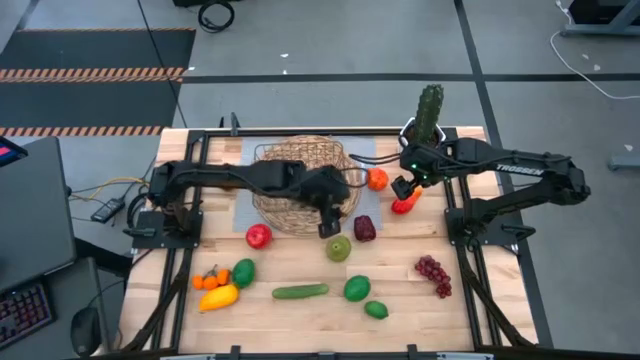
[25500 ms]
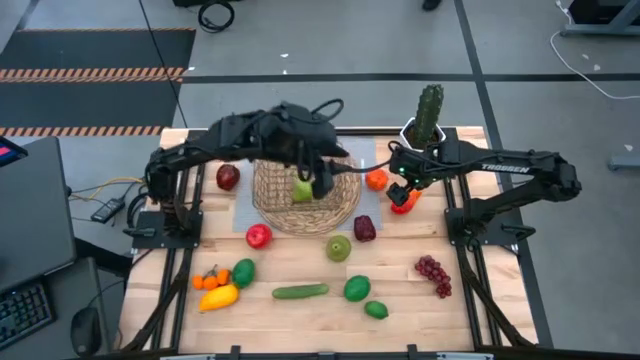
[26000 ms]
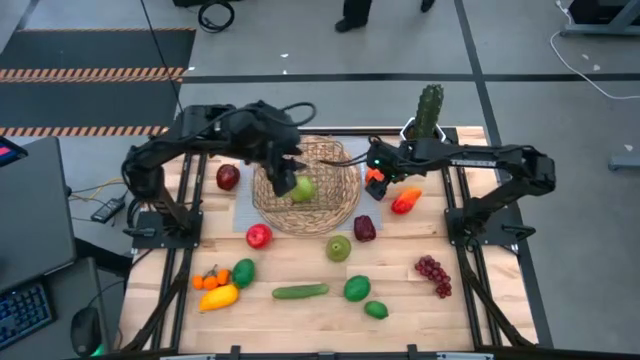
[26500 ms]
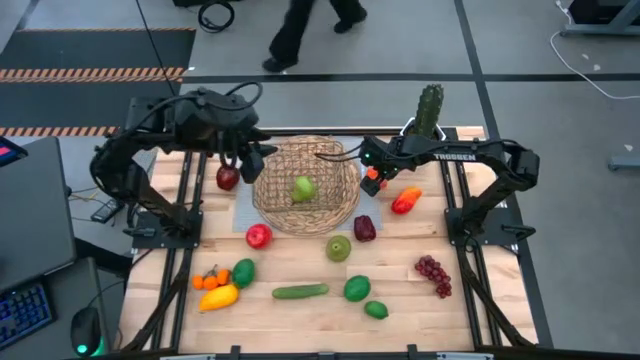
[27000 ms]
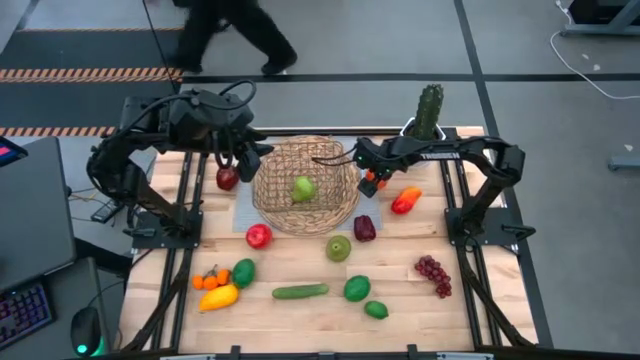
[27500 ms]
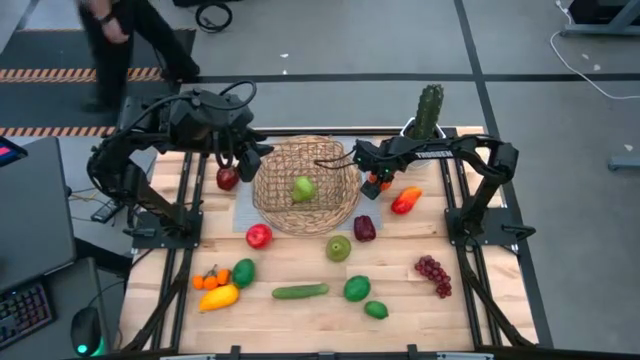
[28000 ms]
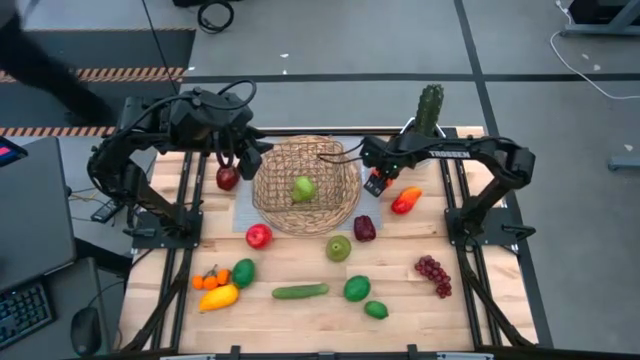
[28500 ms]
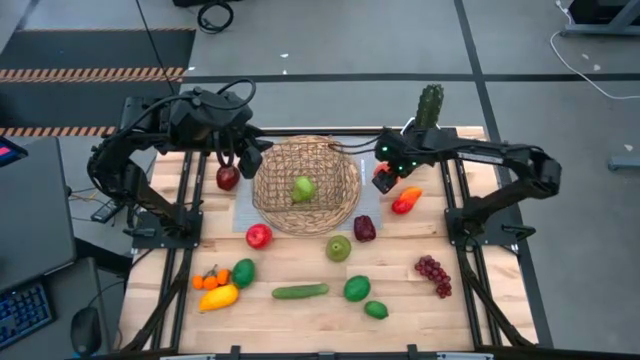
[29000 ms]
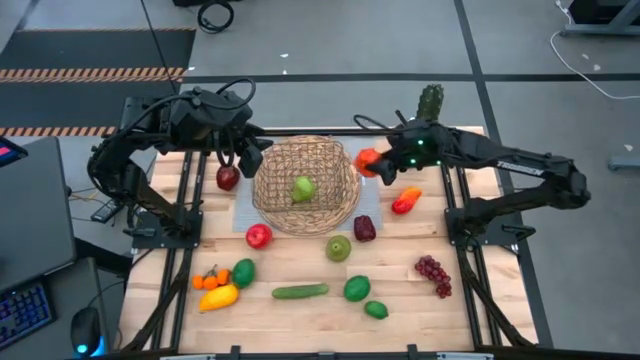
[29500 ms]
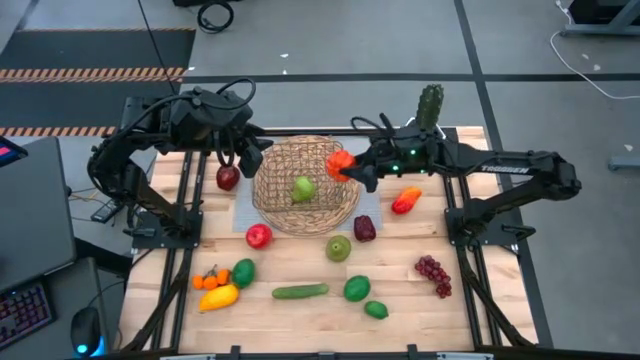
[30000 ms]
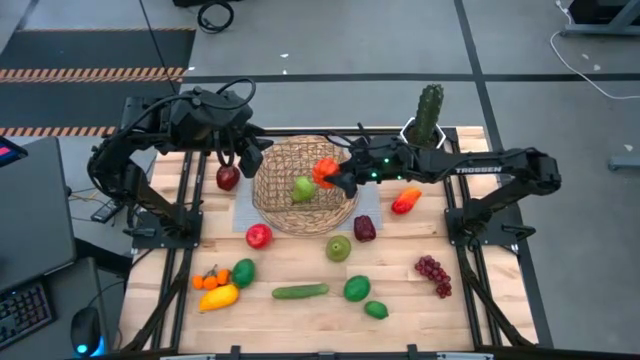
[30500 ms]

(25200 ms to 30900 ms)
Task: Build produce basket
Put the pumpkin into the gold wire basket

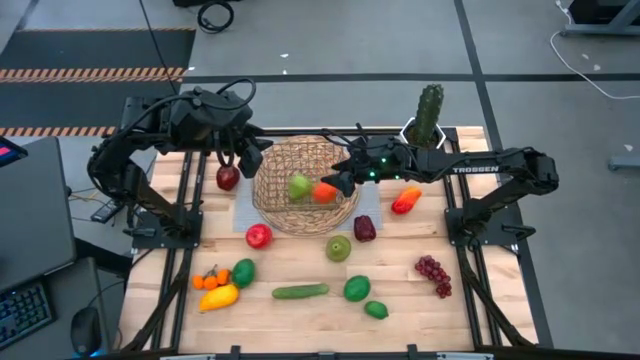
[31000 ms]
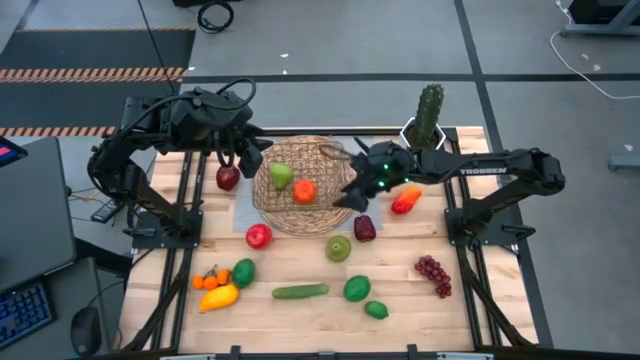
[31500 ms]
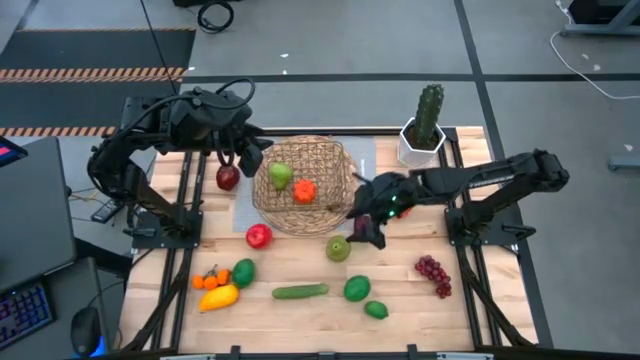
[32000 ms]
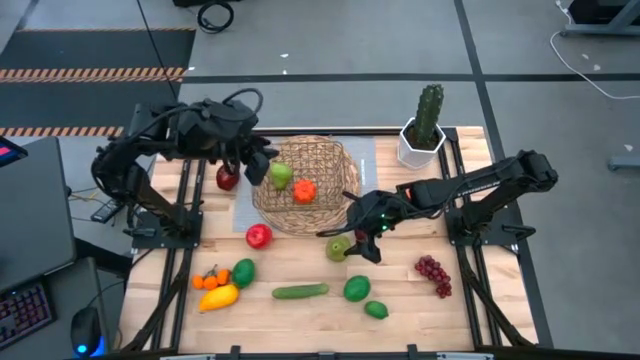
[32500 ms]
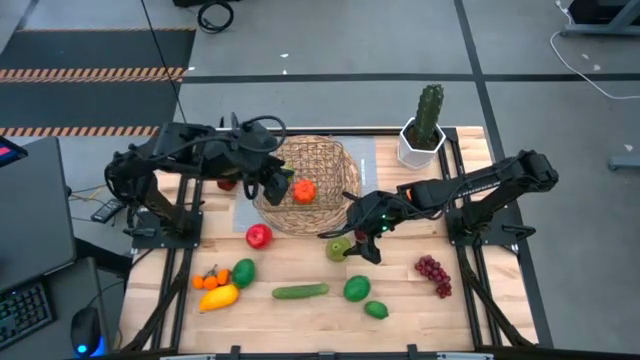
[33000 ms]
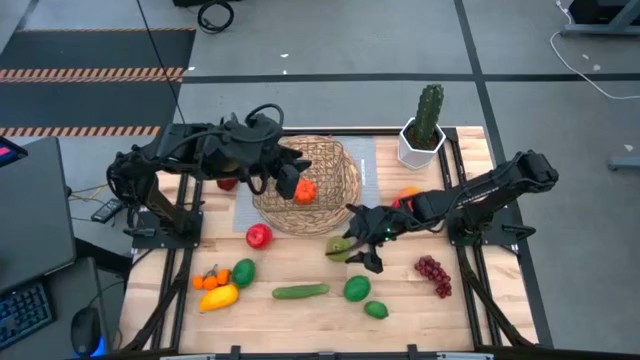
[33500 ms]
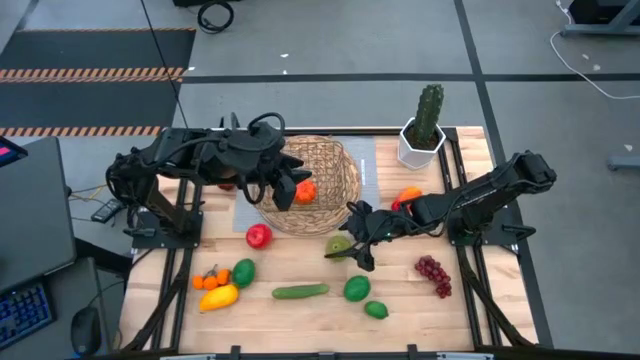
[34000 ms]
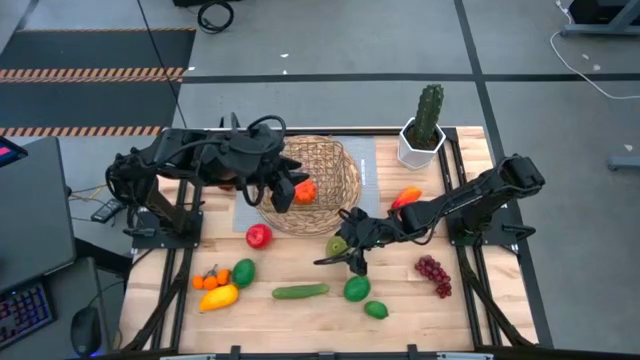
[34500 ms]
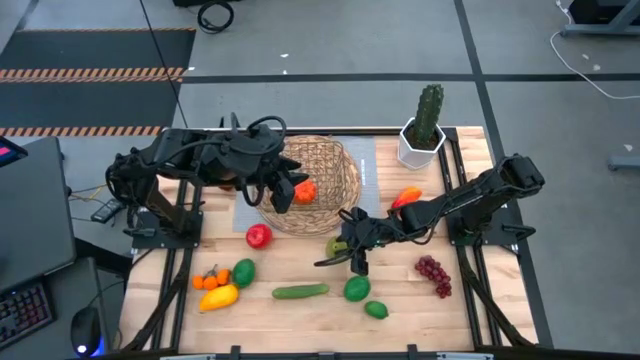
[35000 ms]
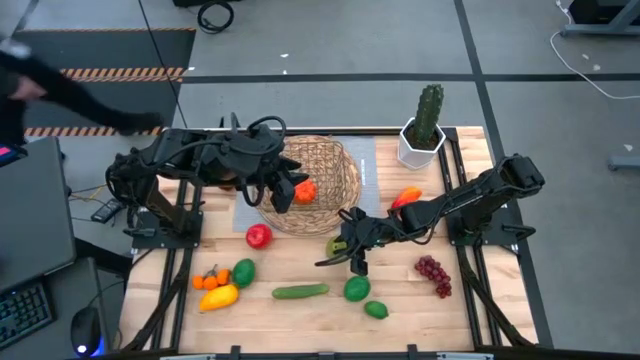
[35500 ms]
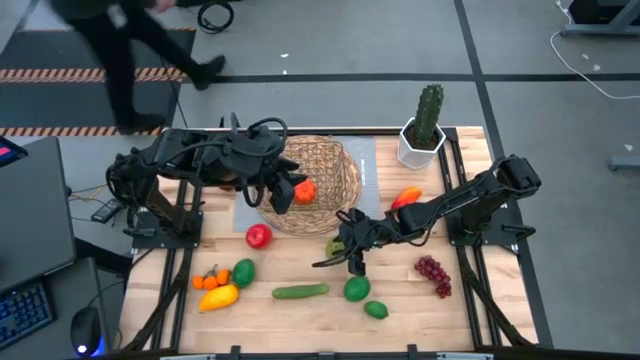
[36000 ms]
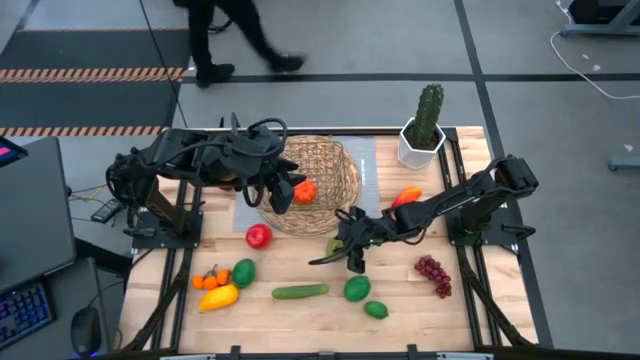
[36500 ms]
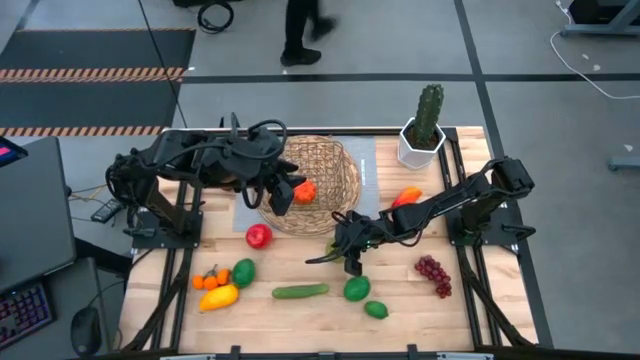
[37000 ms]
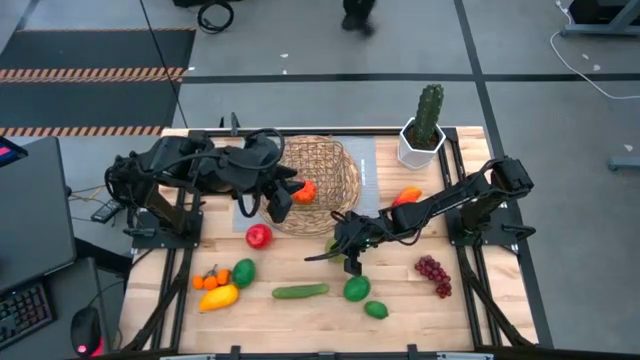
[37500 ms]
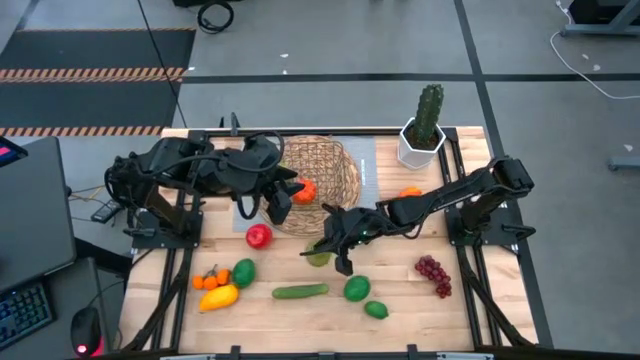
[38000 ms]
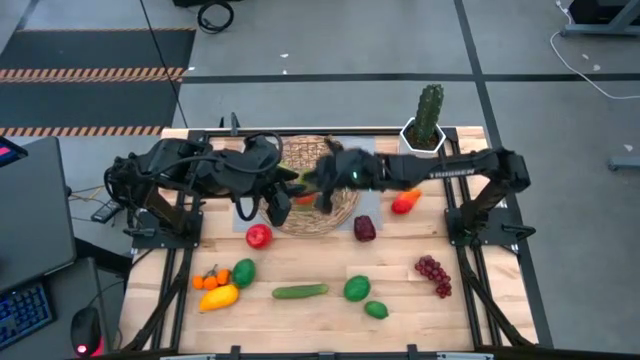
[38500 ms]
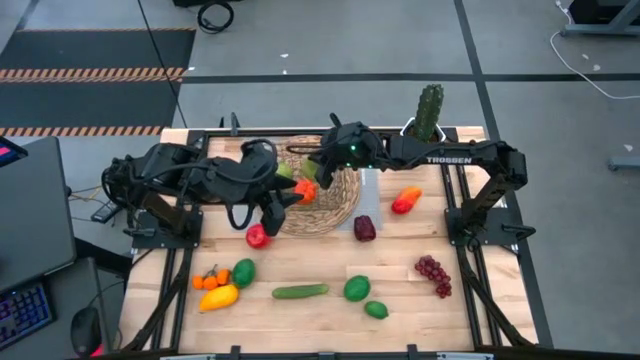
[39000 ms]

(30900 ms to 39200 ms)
Put the pear into the gold wire basket

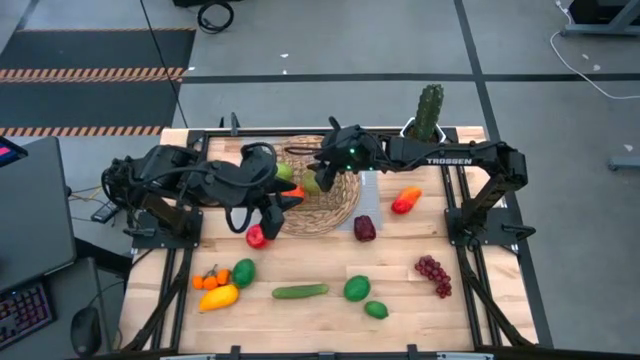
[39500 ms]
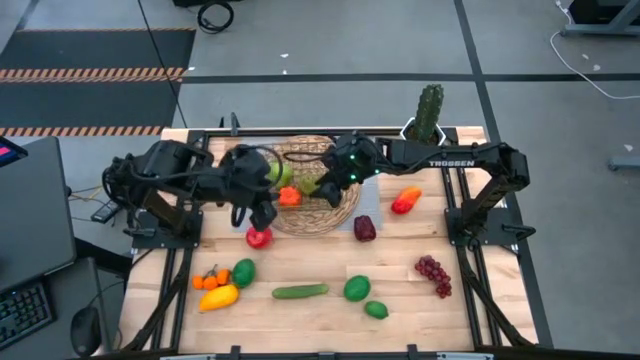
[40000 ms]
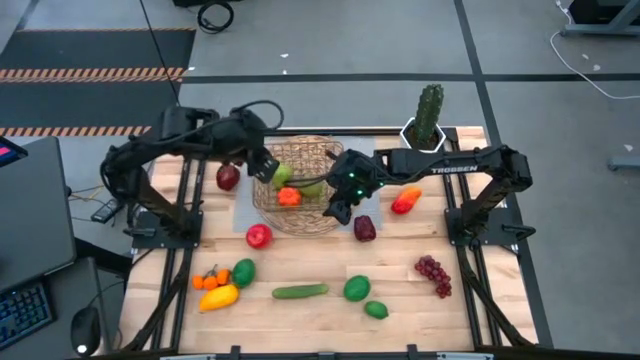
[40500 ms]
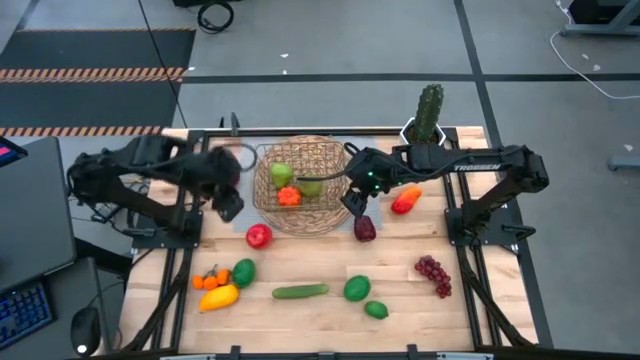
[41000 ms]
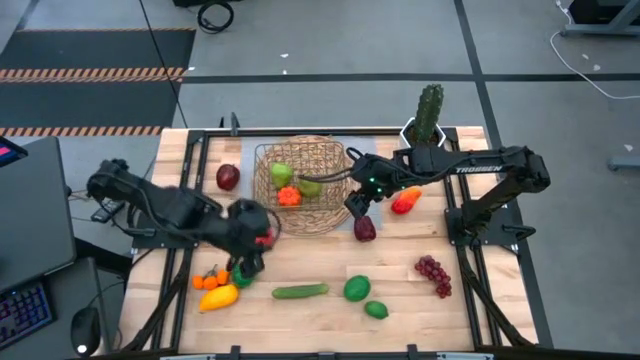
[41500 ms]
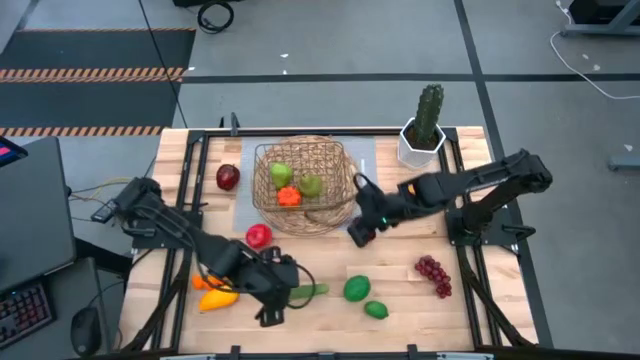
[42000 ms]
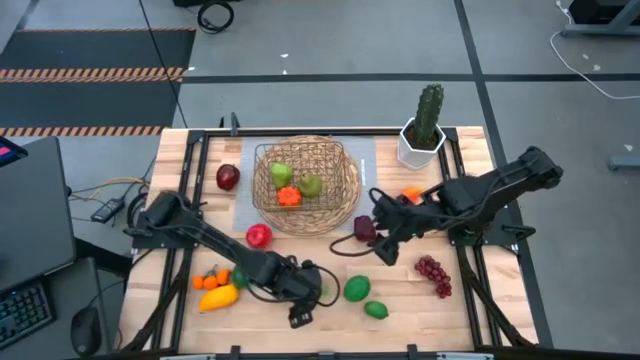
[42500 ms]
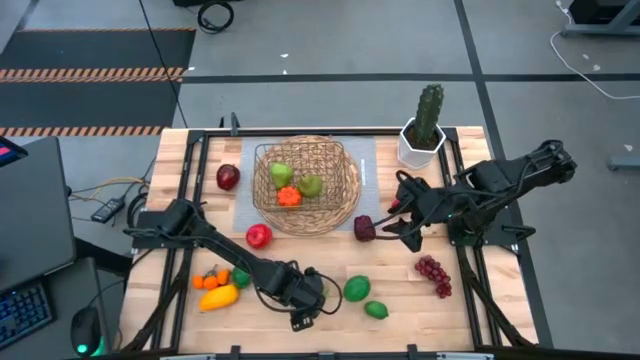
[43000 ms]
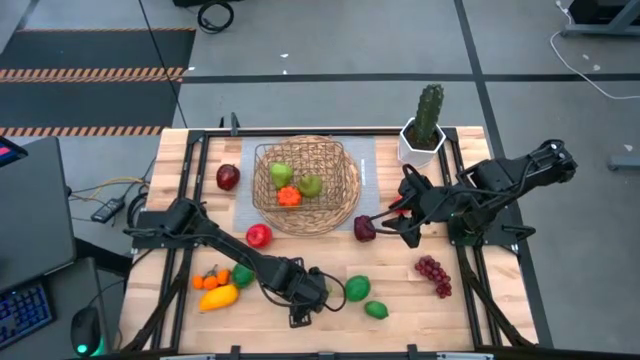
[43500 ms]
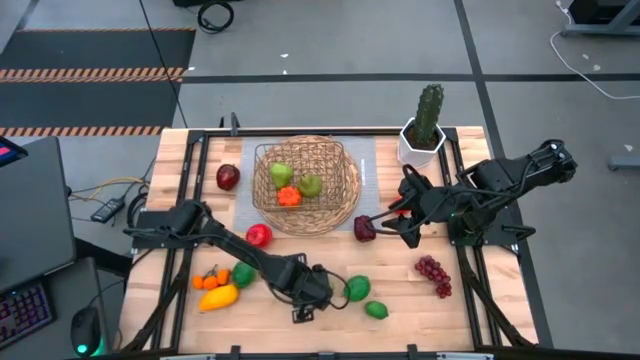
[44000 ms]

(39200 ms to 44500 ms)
Put the cucumber into the gold wire basket

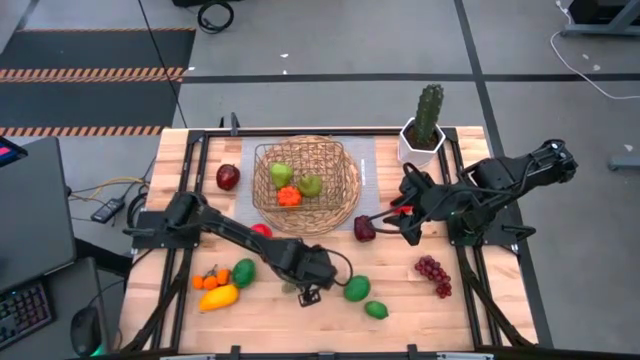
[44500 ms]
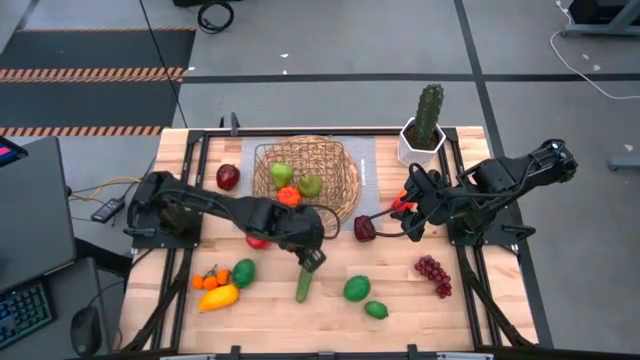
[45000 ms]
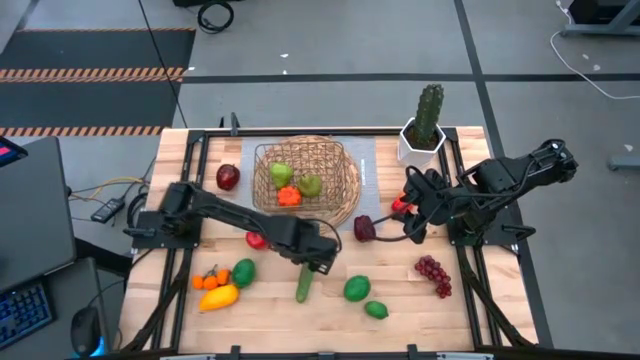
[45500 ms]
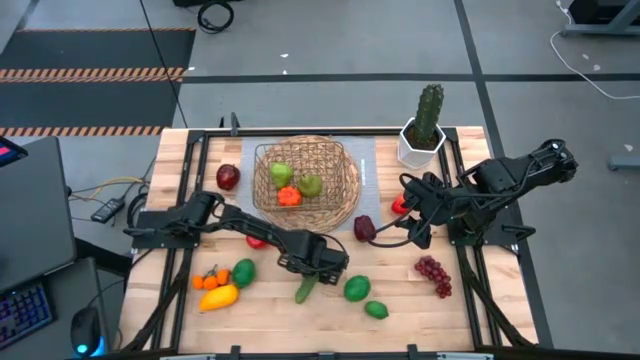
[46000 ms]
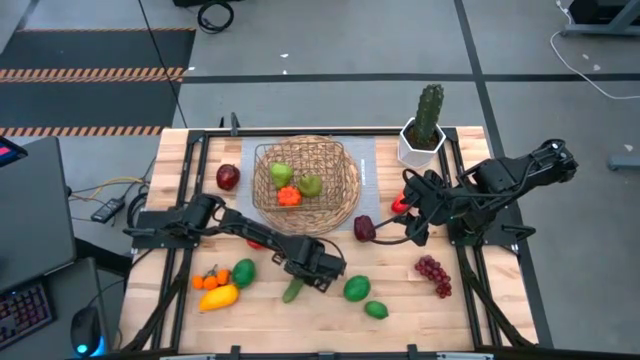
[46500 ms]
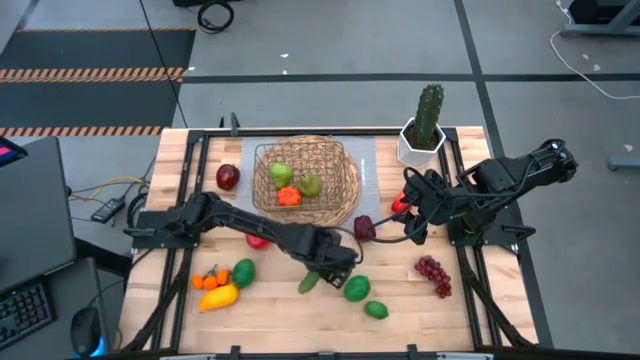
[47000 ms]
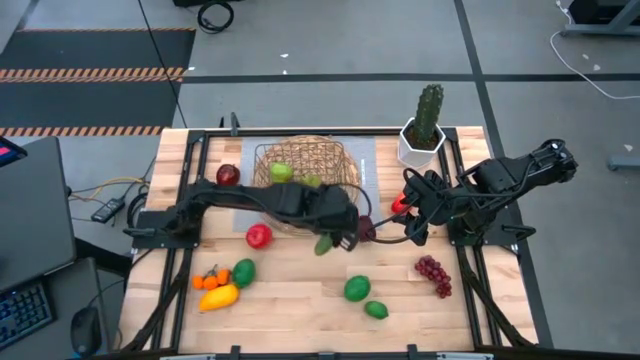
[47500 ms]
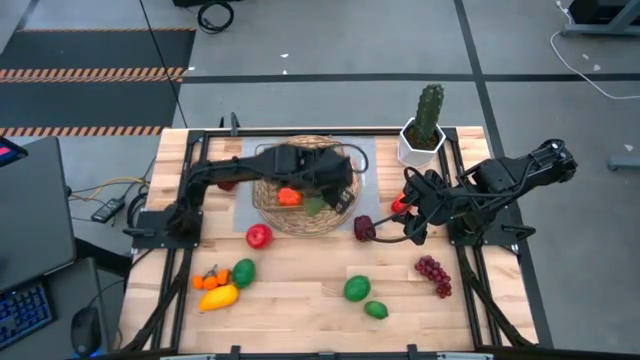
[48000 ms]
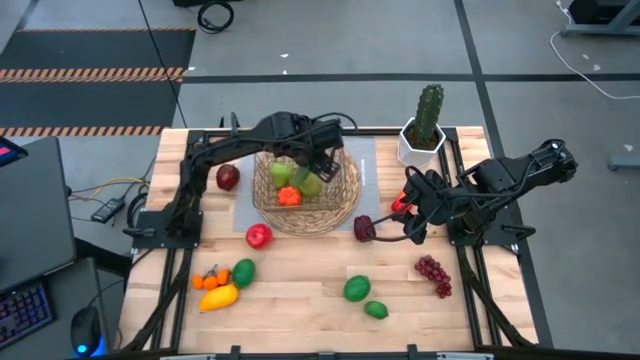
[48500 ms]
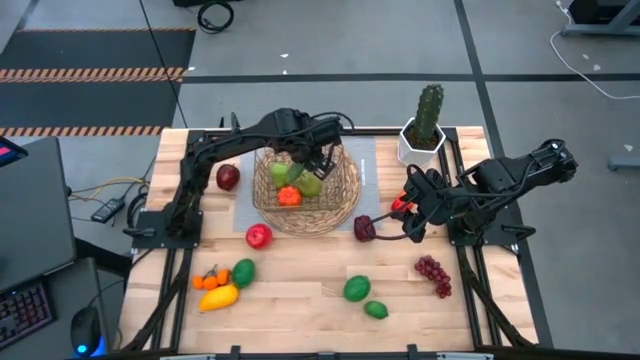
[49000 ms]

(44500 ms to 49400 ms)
Put the cucumber into the gold wire basket
